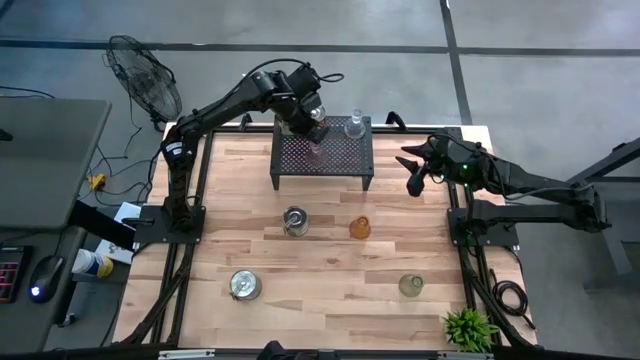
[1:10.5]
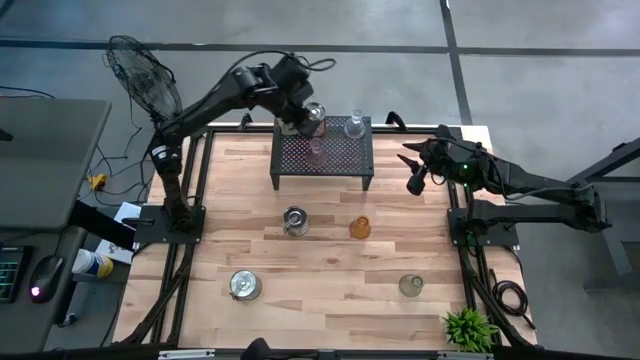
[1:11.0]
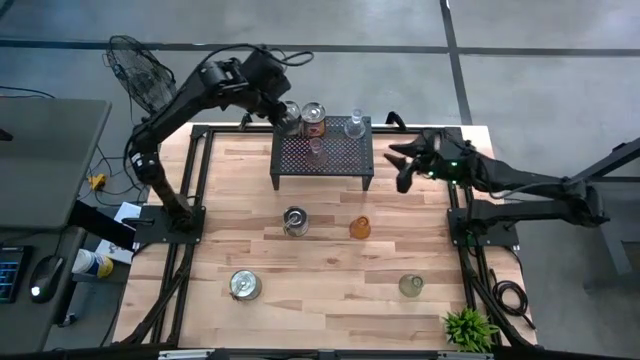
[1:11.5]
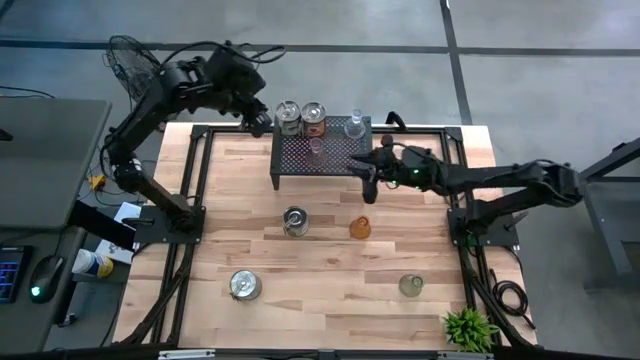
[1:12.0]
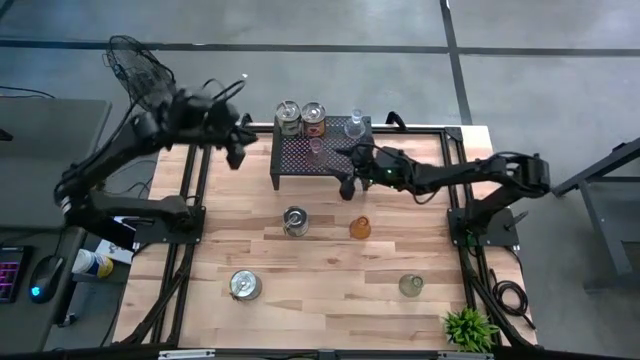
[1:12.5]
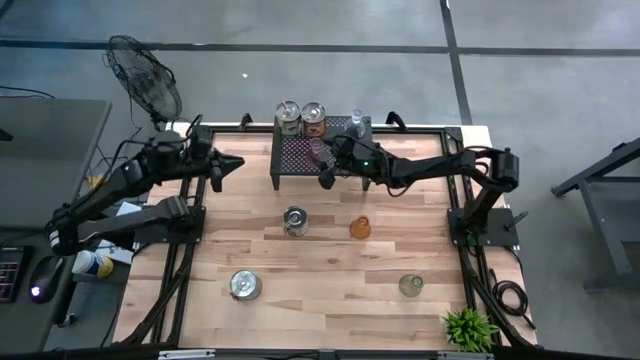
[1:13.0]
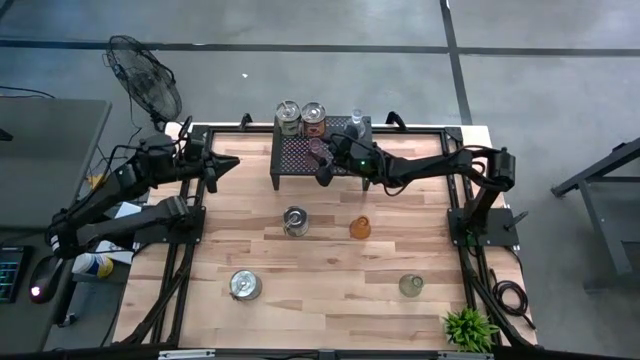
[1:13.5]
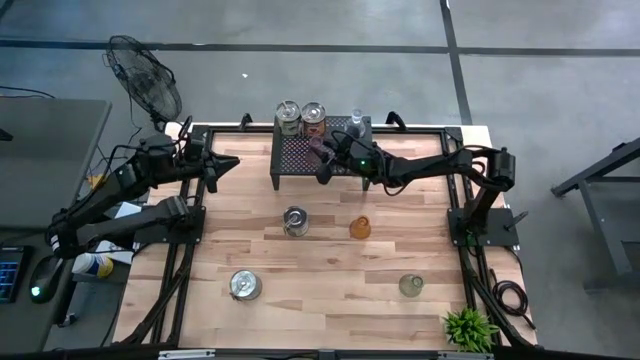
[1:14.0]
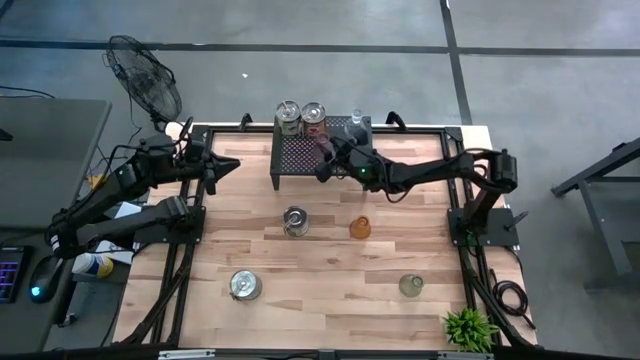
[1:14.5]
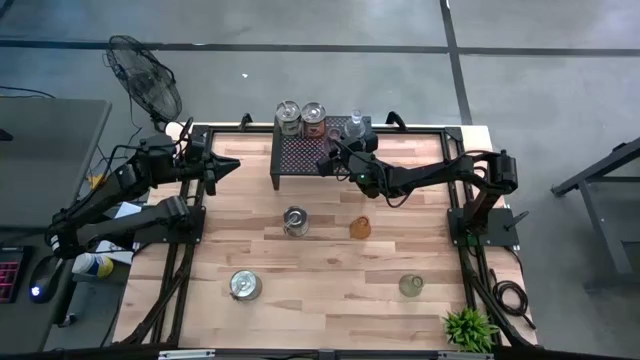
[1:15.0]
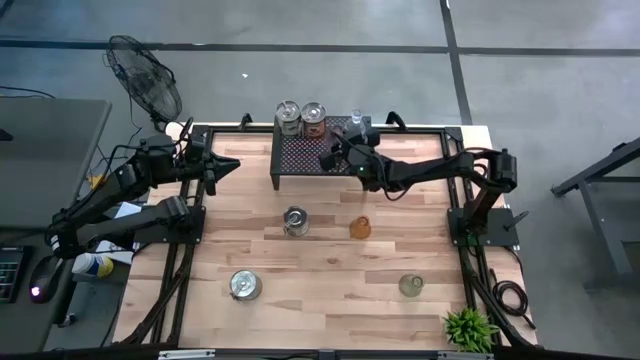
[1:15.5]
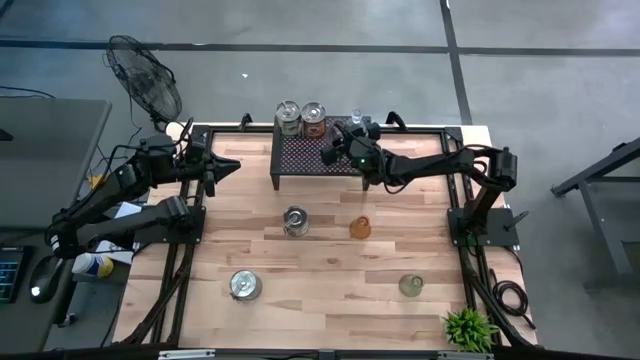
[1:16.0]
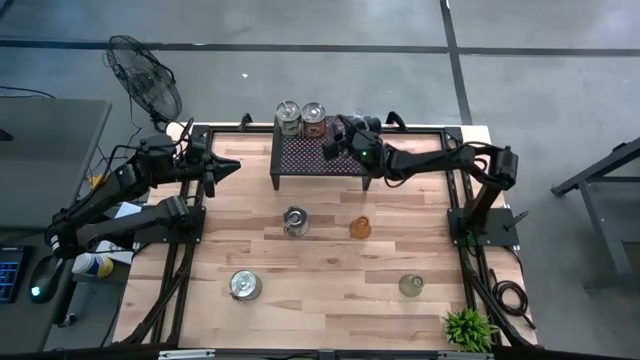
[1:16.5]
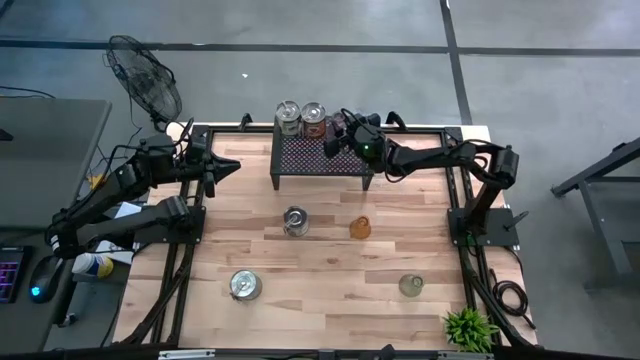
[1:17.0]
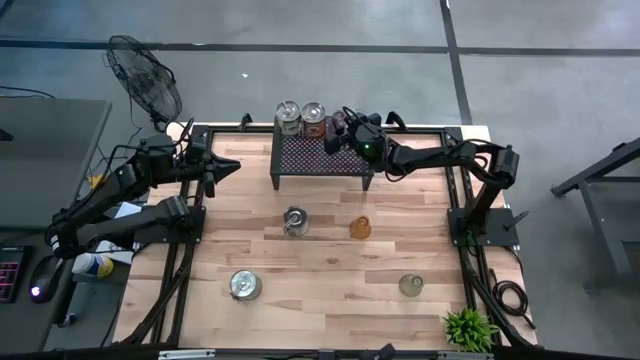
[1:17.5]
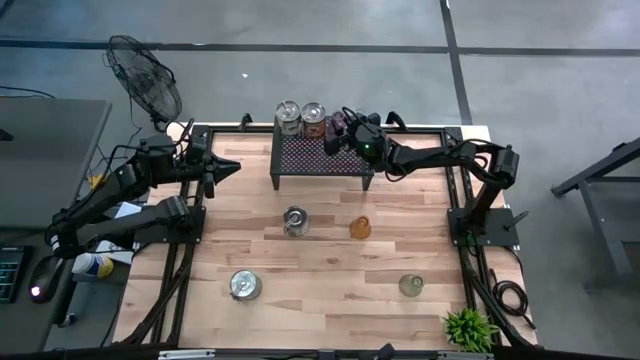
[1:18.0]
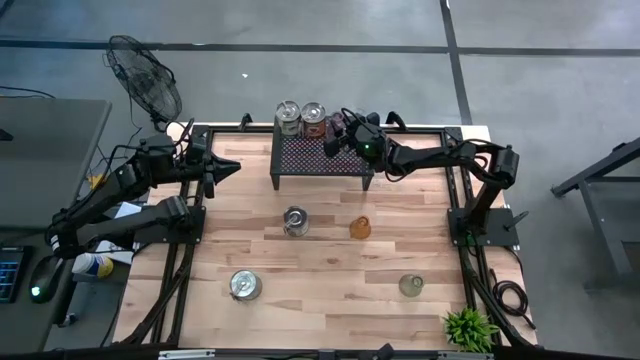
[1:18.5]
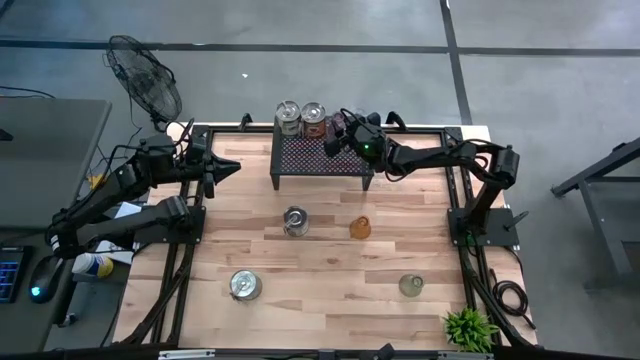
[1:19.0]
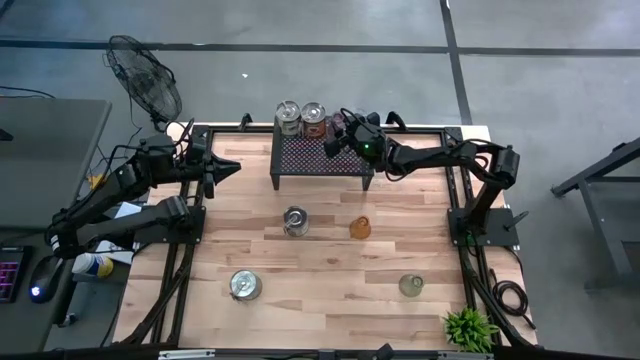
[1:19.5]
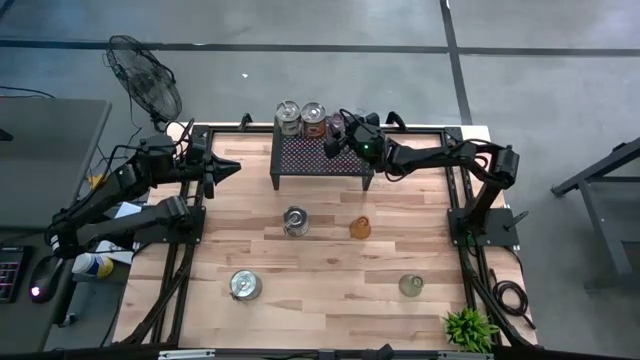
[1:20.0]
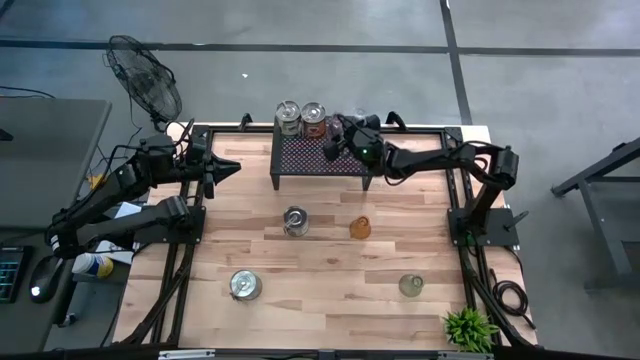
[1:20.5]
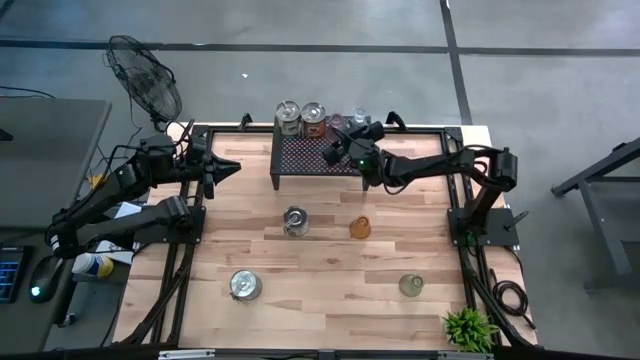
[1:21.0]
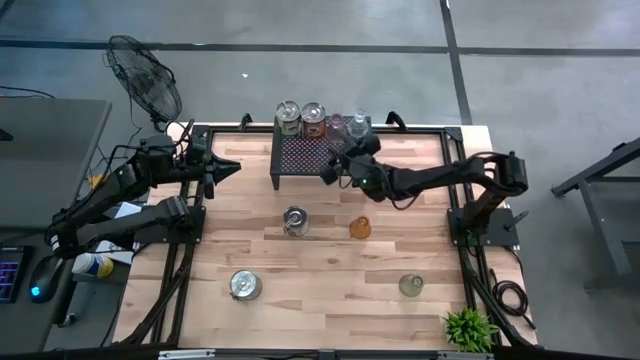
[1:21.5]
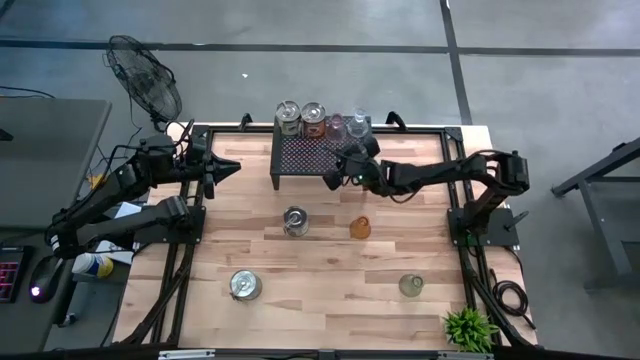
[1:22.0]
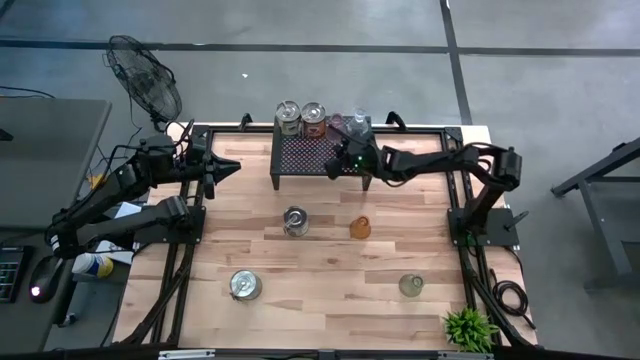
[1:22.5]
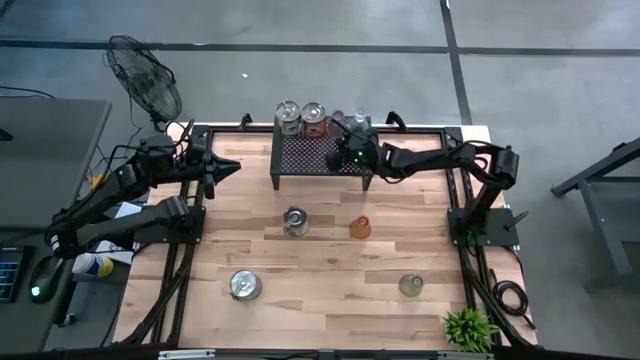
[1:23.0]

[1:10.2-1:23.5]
Task: Pick & Place candle stick holders
Put the pink candle holder on the shelf

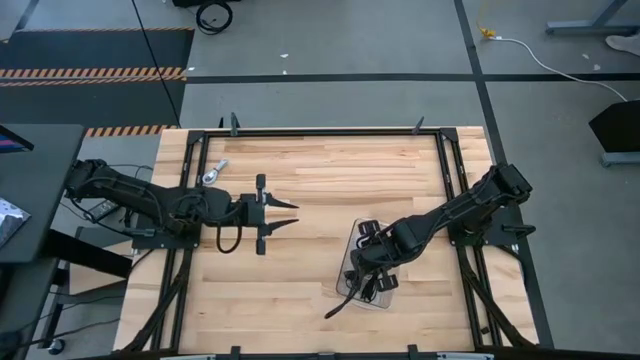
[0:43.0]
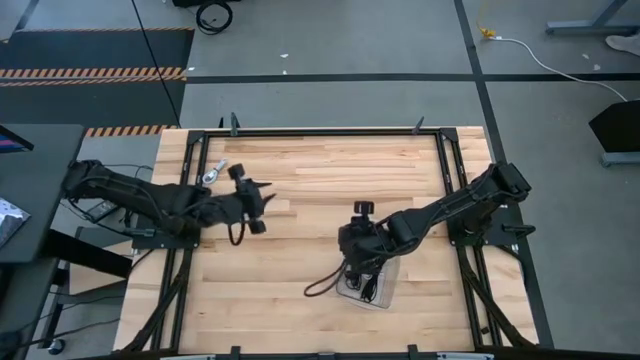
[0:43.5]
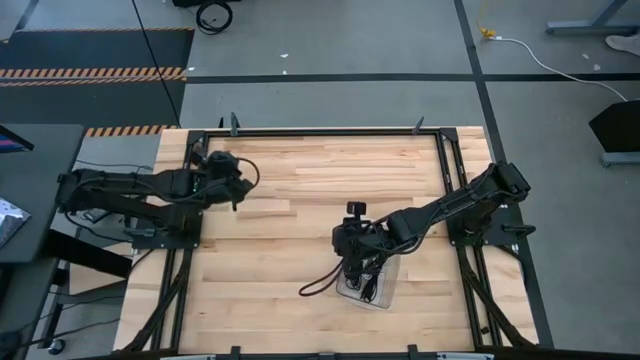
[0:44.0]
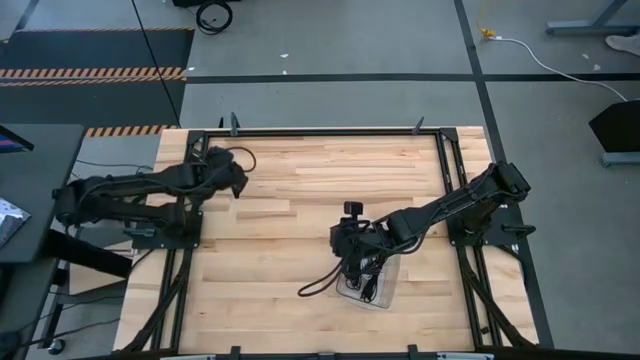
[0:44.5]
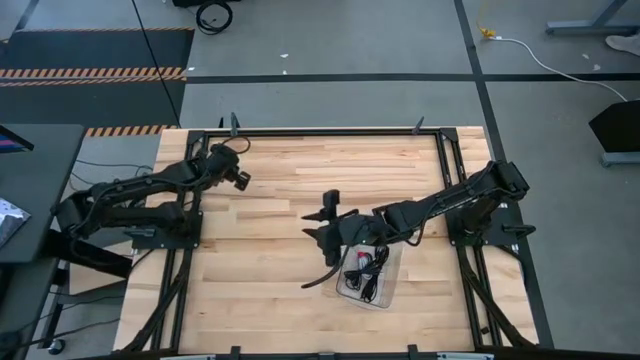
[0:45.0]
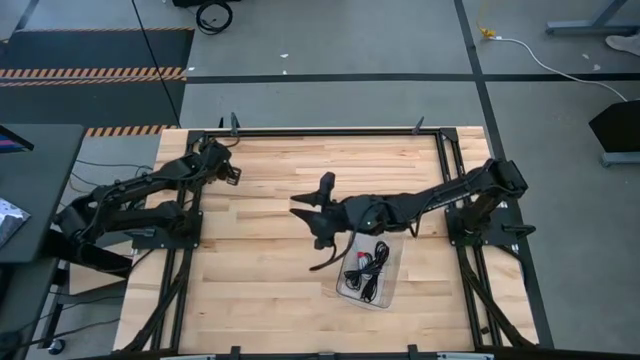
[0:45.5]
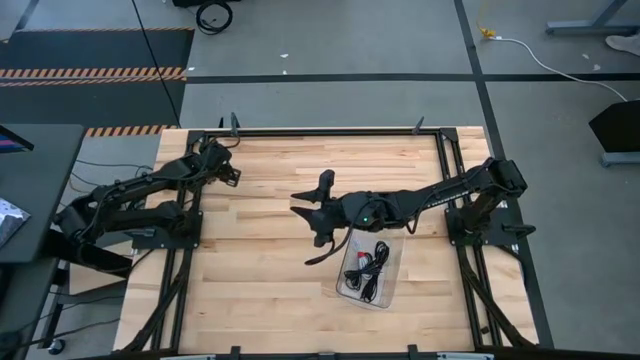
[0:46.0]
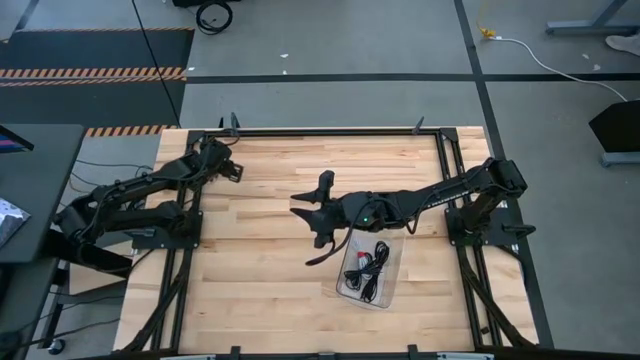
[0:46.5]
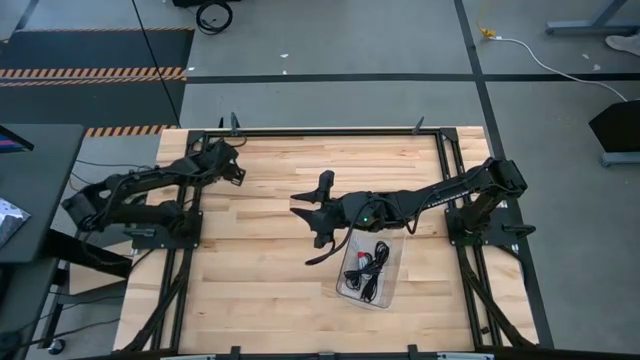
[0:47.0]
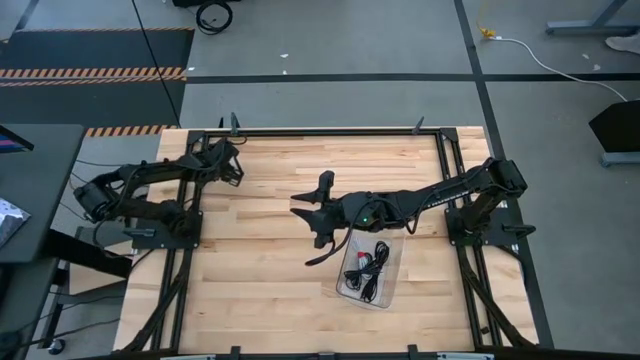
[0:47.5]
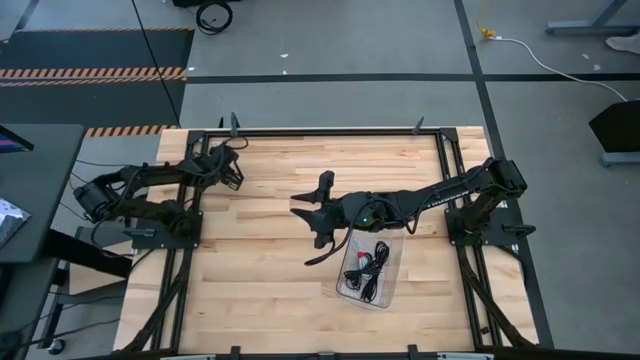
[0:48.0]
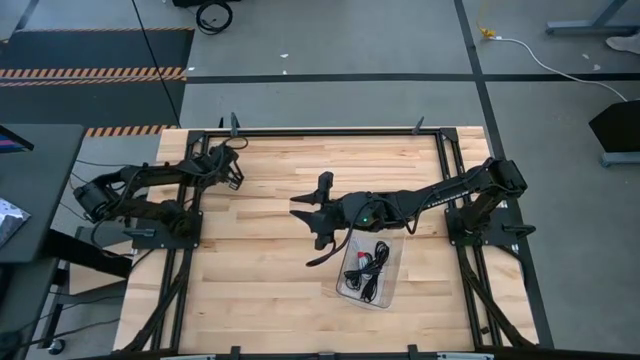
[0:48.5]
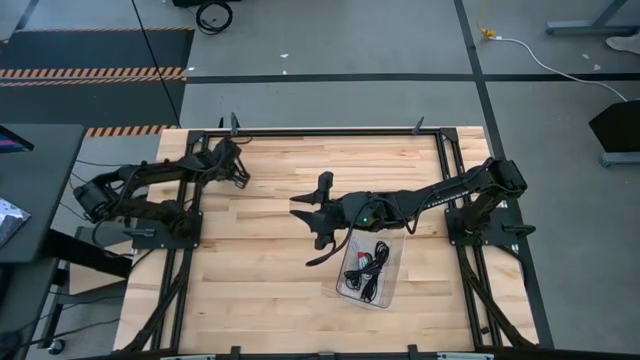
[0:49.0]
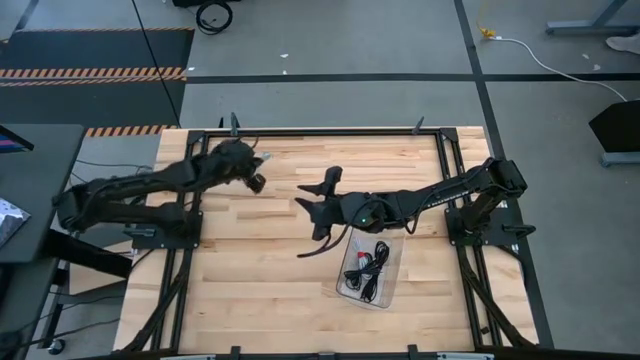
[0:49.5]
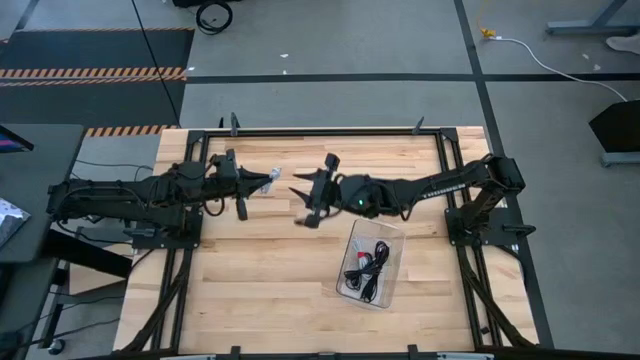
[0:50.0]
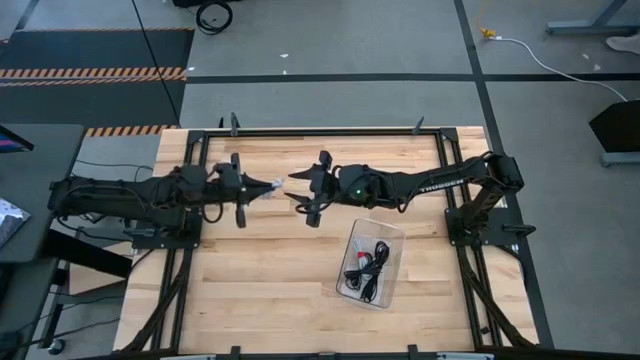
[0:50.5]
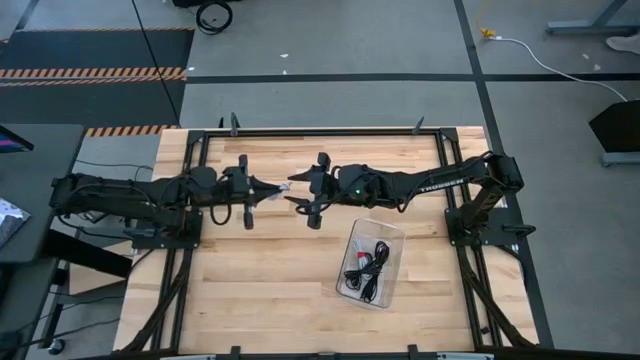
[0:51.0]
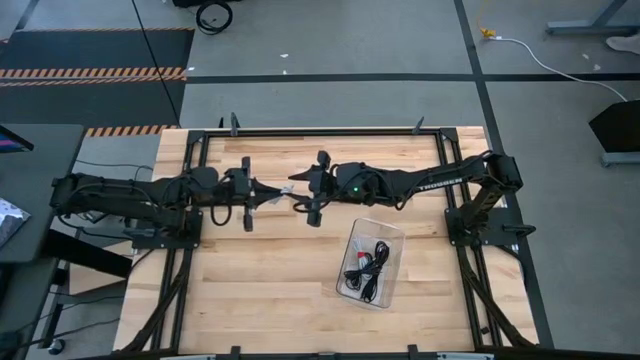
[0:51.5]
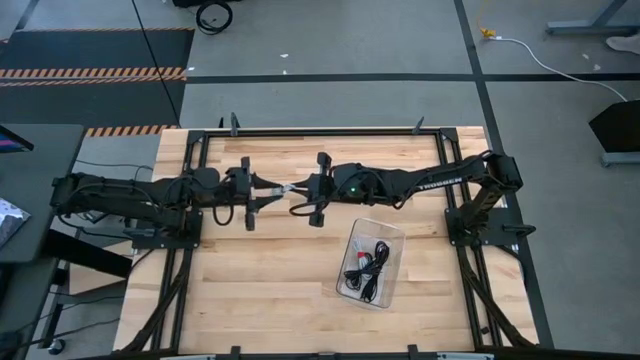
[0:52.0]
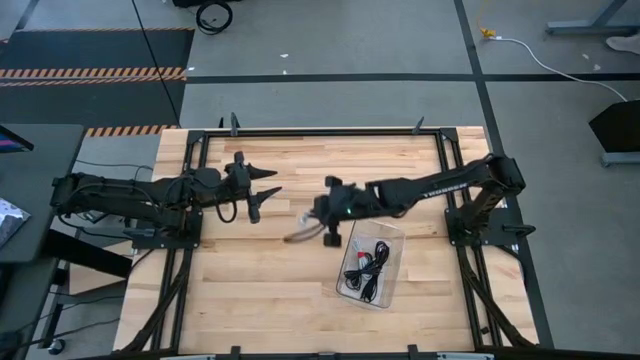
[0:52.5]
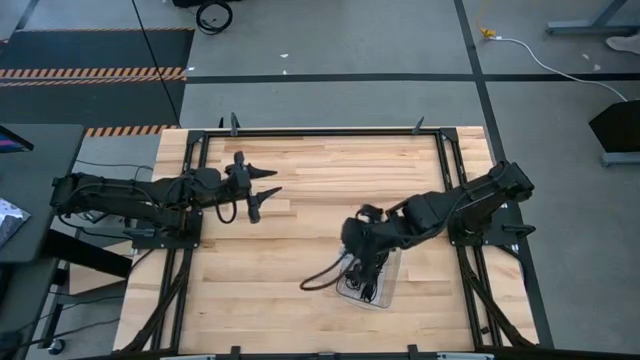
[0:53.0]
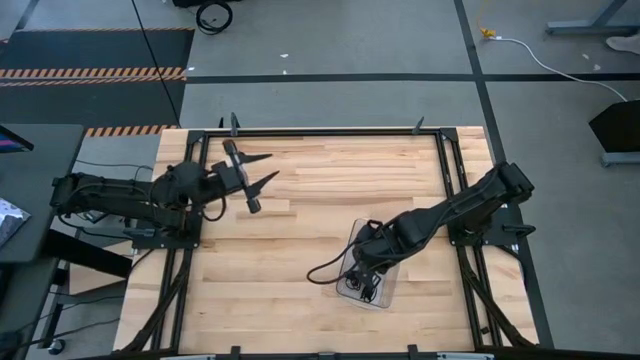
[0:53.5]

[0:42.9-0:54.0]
Task: Pick and place USB-C Cables
Put the white USB charger cable into the transparent bin
